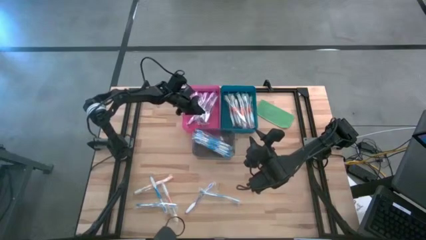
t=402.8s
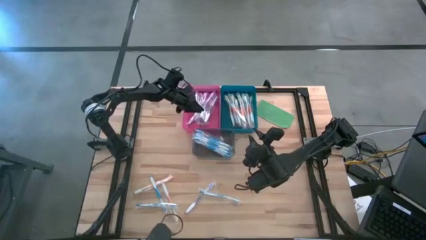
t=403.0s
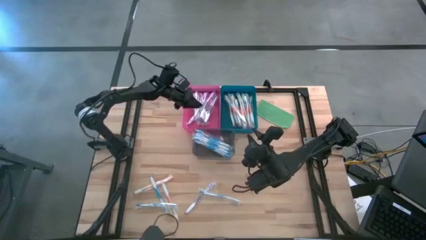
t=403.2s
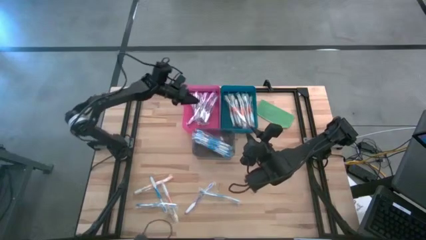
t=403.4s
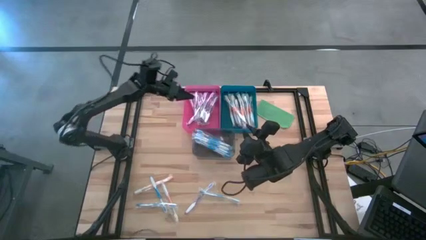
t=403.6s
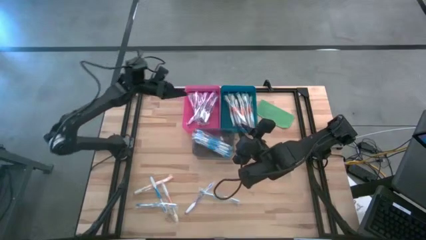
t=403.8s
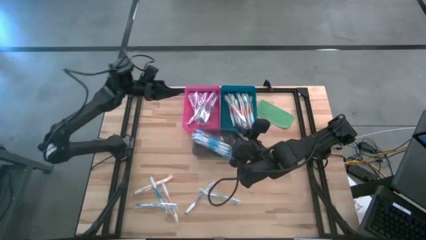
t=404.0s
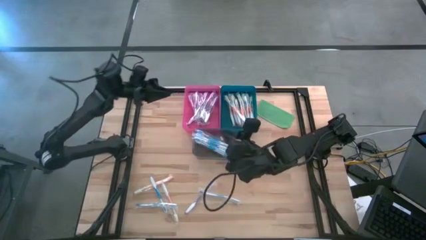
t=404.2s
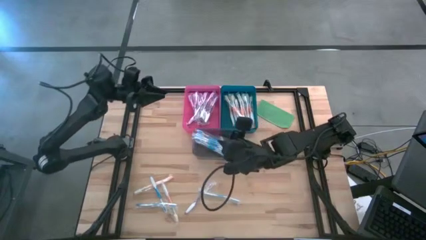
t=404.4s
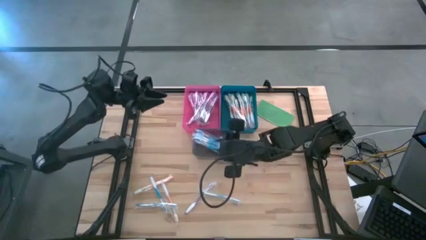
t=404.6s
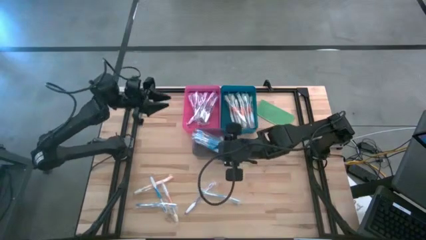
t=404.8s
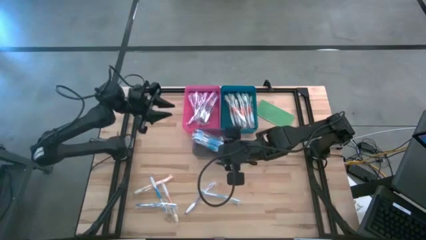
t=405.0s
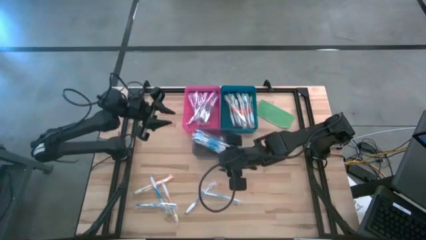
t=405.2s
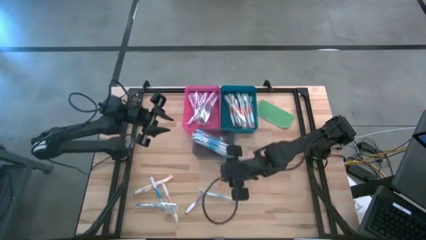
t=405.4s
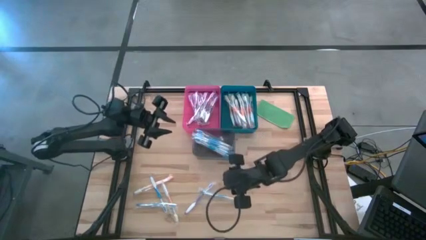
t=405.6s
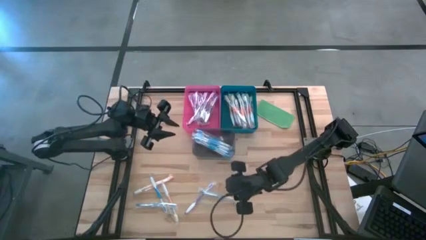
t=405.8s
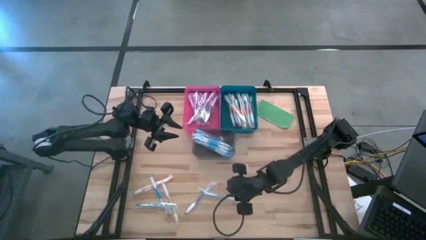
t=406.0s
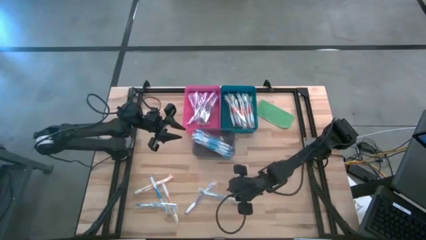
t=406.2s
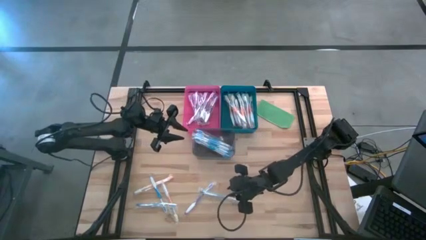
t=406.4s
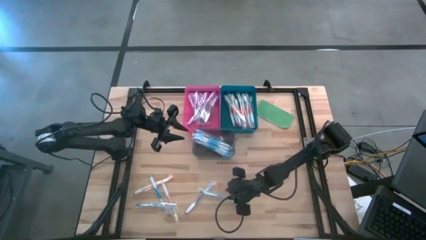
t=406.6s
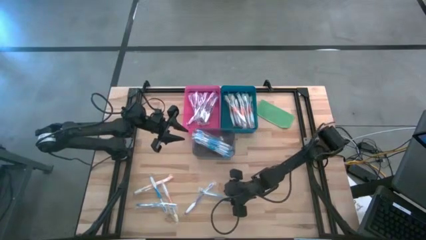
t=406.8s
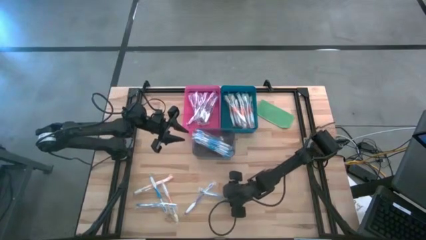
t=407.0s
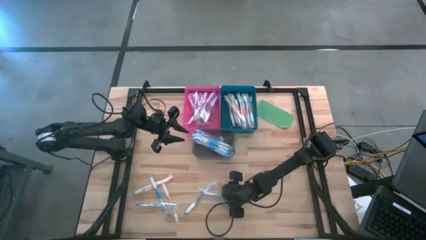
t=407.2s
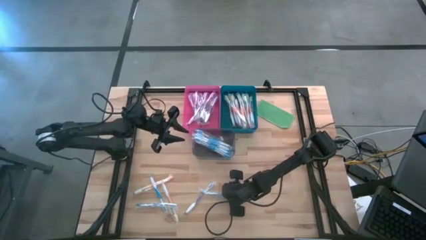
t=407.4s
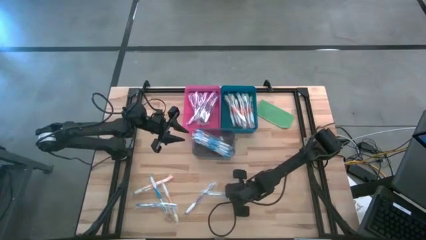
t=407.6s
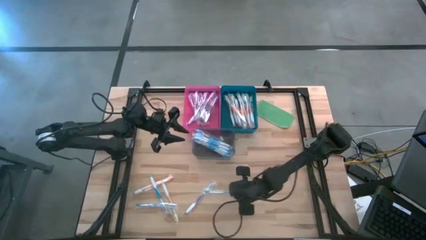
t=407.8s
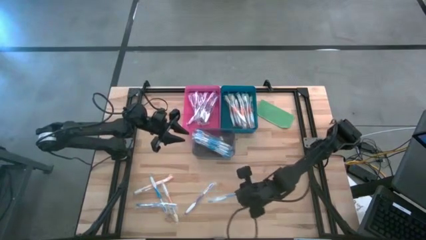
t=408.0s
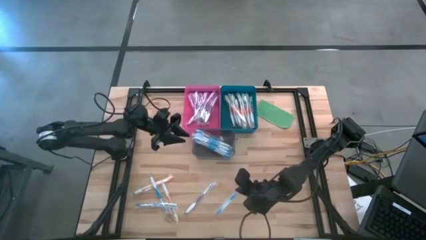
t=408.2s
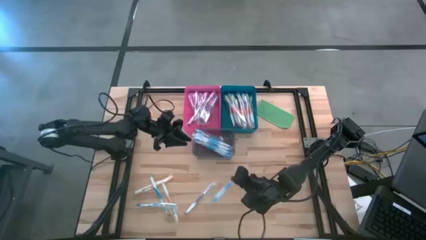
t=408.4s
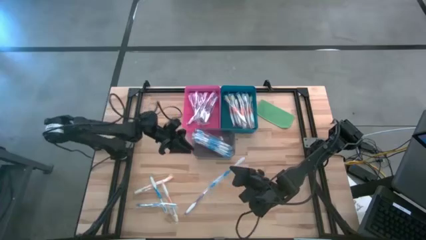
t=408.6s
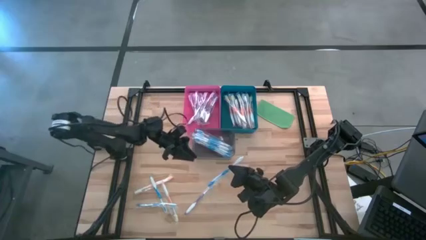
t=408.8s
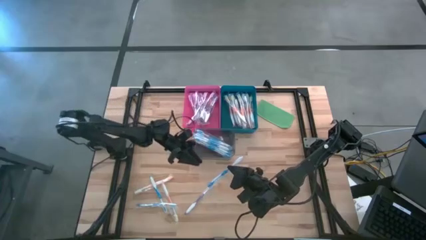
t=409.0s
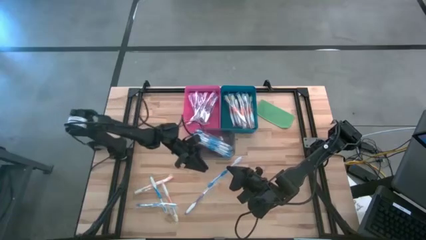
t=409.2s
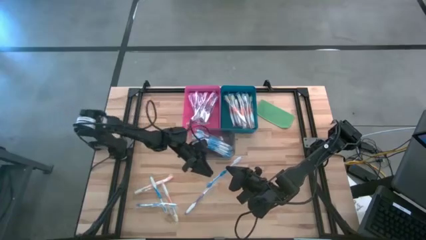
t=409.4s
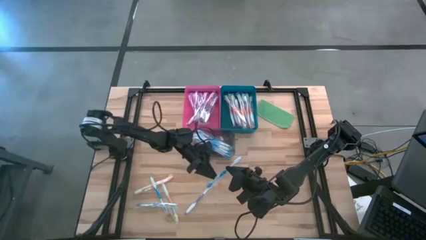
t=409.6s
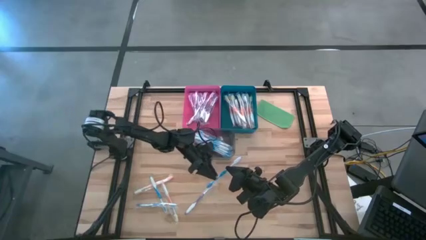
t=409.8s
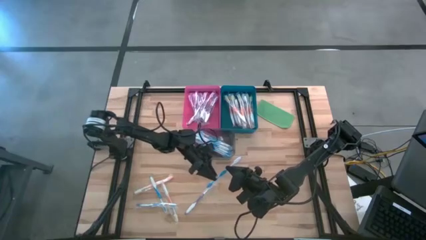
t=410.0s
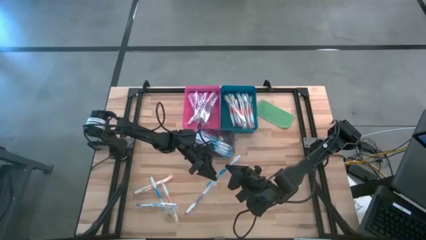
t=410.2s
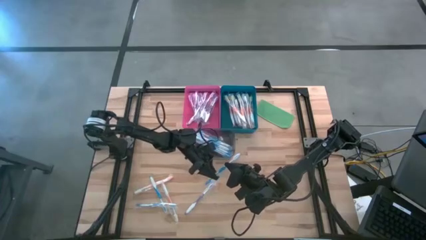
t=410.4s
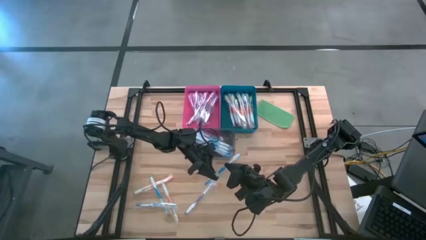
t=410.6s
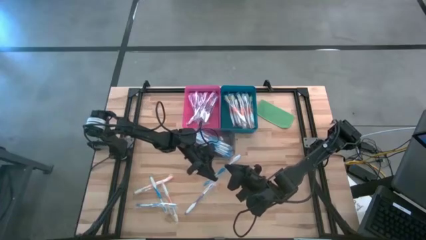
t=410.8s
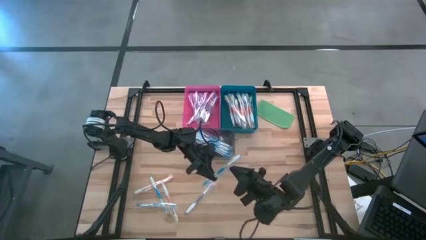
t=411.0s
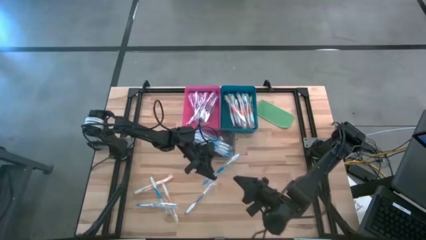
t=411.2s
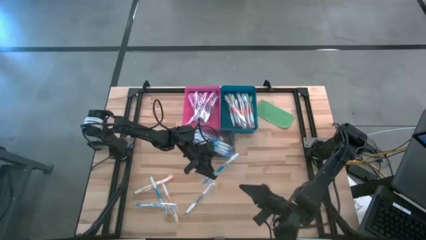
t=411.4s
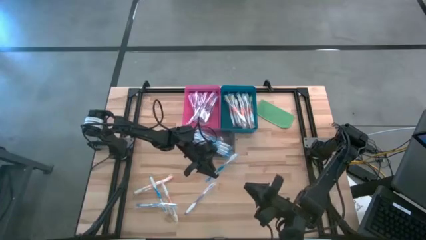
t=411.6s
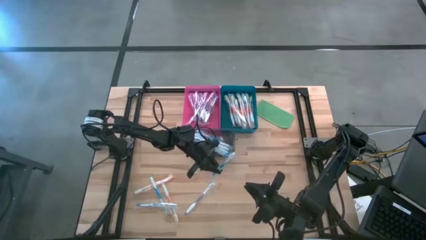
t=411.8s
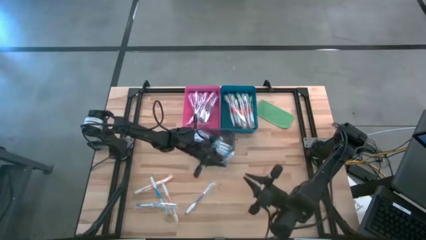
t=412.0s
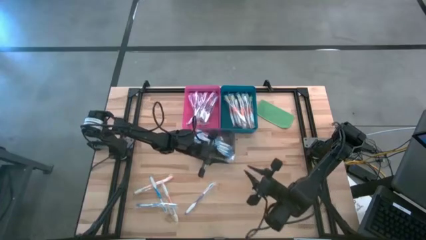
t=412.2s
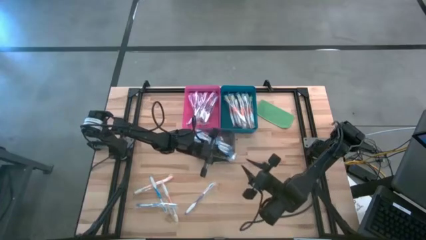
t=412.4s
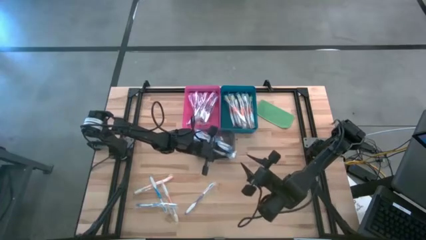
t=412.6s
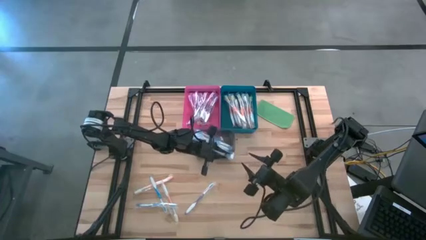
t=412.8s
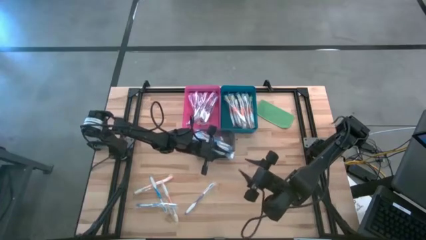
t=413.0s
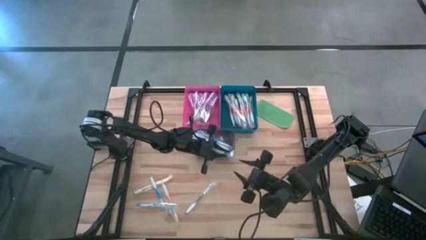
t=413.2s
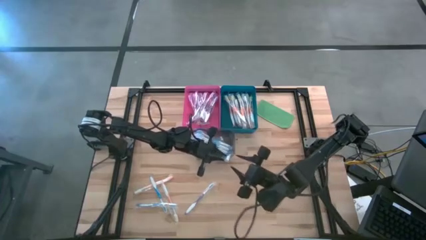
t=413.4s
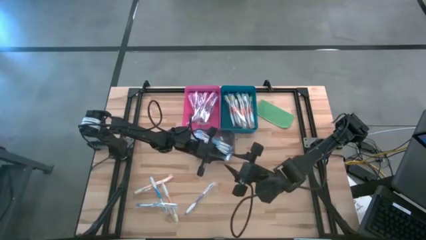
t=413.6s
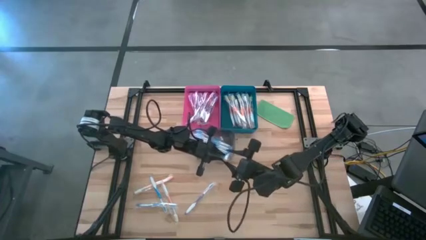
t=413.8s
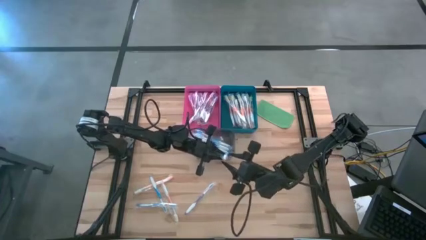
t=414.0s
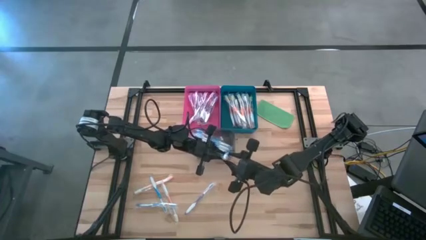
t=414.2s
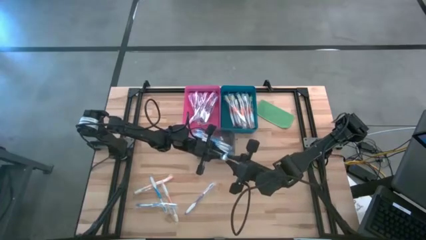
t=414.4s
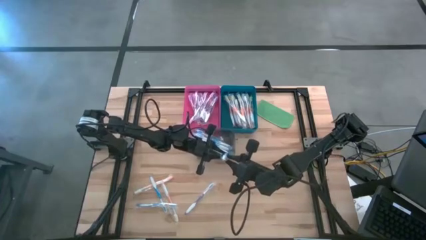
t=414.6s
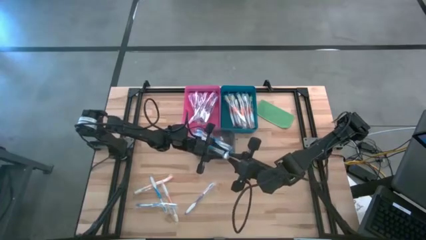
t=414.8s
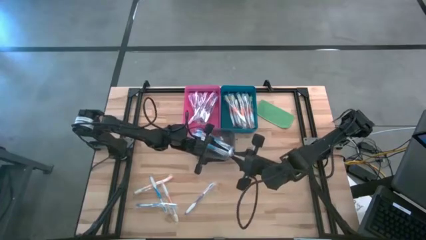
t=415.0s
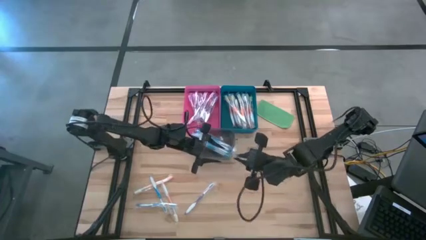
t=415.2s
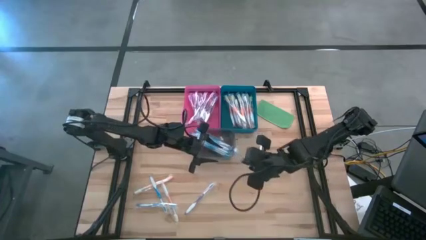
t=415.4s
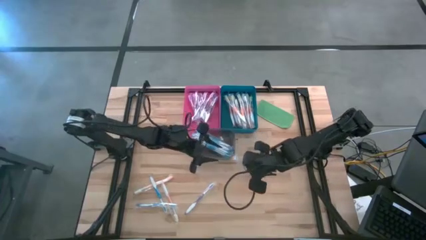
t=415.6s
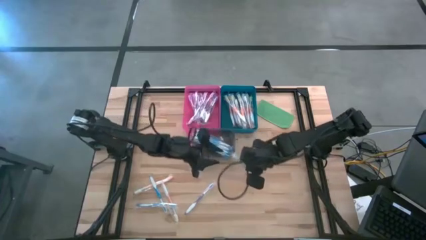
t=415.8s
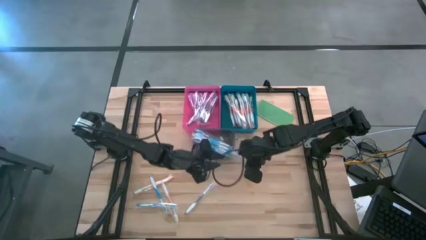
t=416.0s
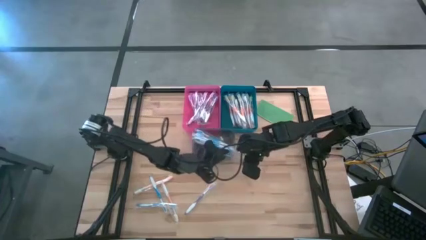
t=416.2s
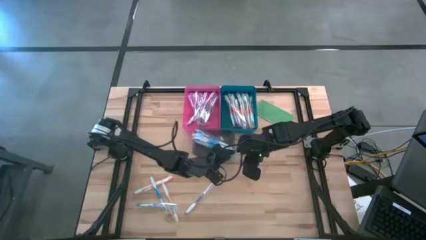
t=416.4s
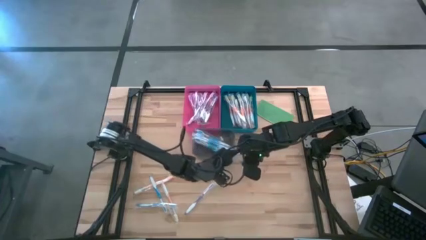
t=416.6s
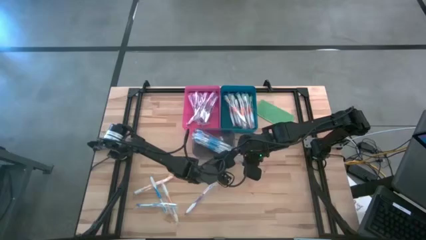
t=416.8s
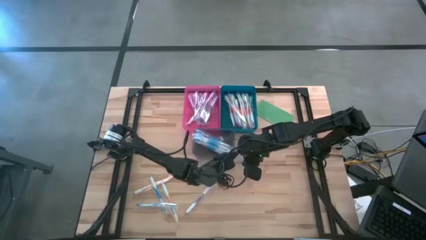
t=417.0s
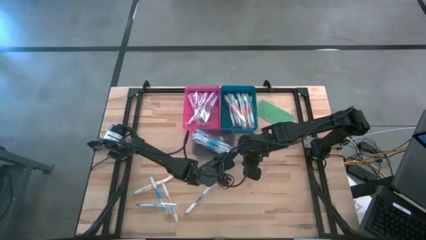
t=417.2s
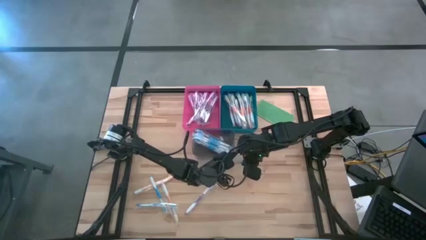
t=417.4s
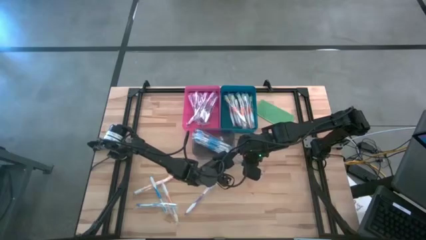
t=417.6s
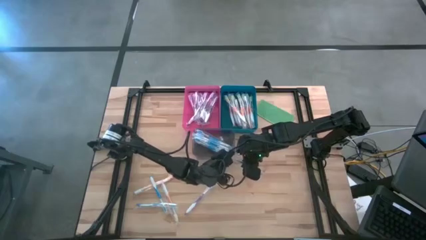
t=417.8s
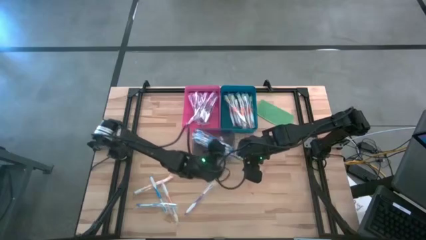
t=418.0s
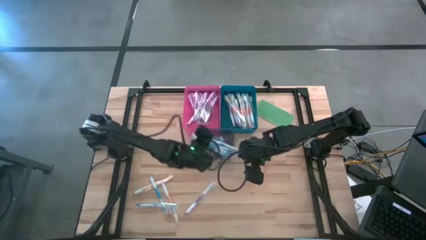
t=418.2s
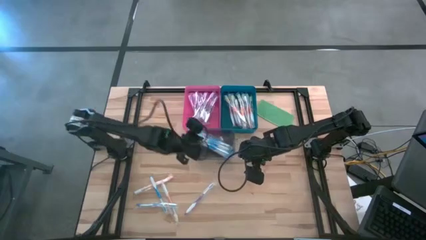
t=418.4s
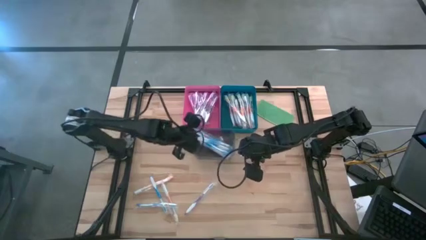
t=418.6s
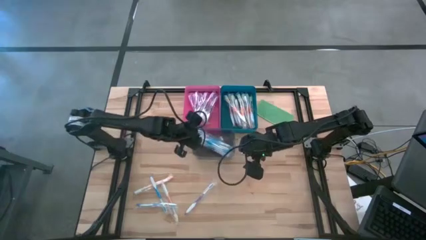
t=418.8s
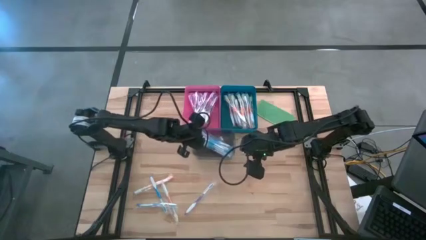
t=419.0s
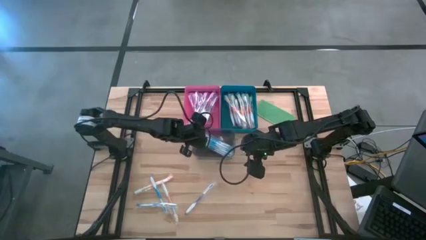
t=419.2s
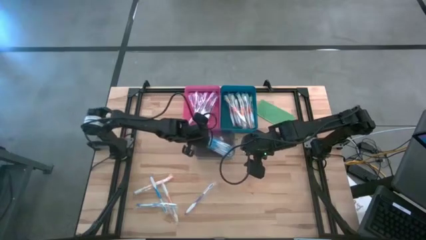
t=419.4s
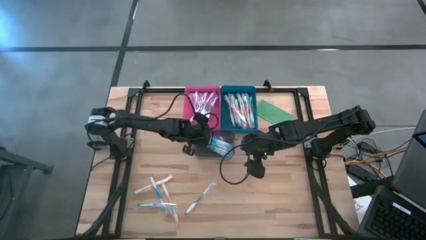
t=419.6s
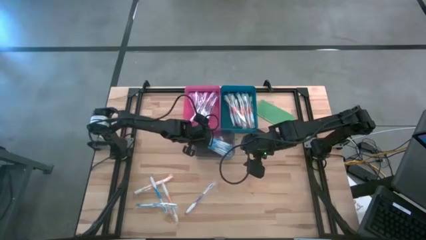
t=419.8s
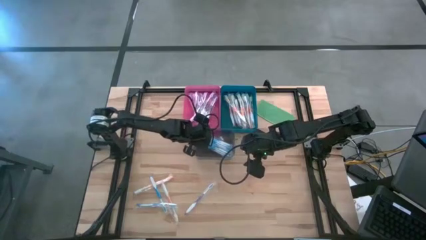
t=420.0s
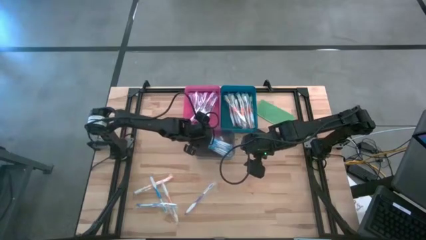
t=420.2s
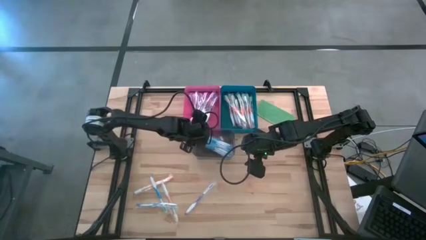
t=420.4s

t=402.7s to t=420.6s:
Task: Pick & Place Toothbrushes
Put the blue toothbrush into the transparent gray bin
